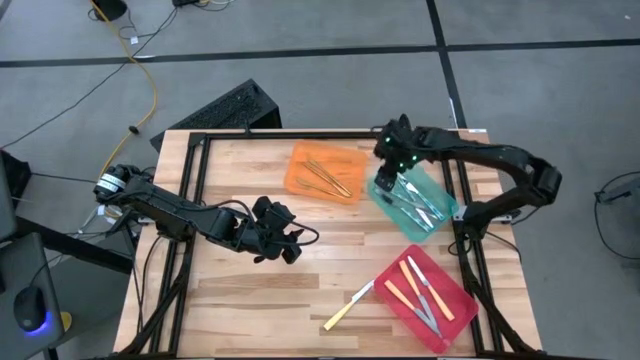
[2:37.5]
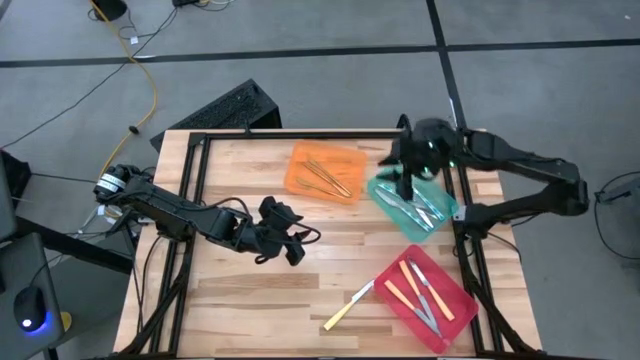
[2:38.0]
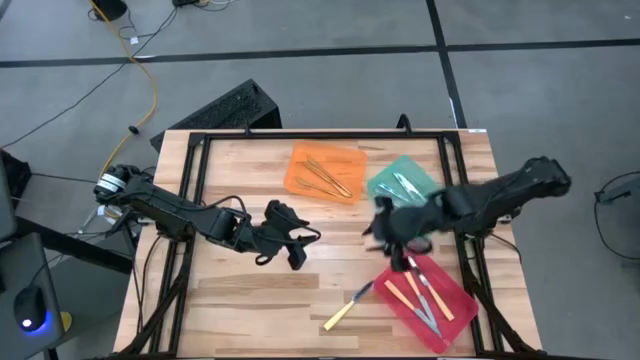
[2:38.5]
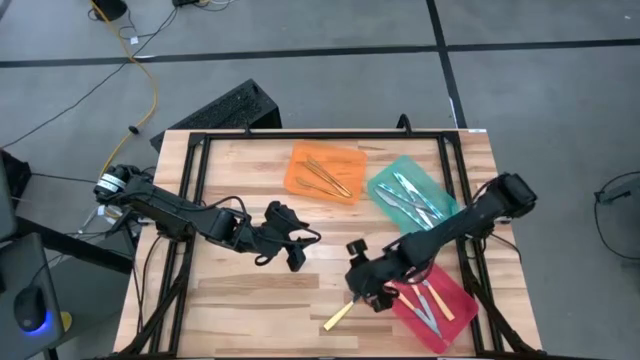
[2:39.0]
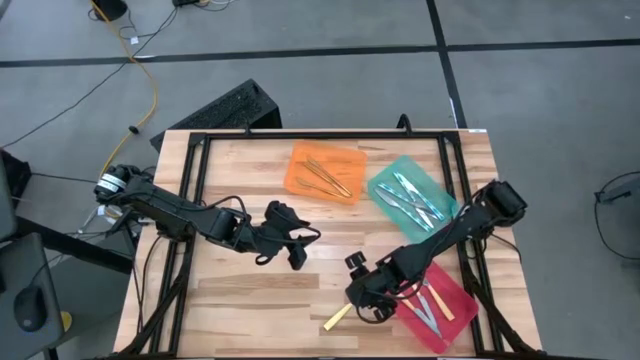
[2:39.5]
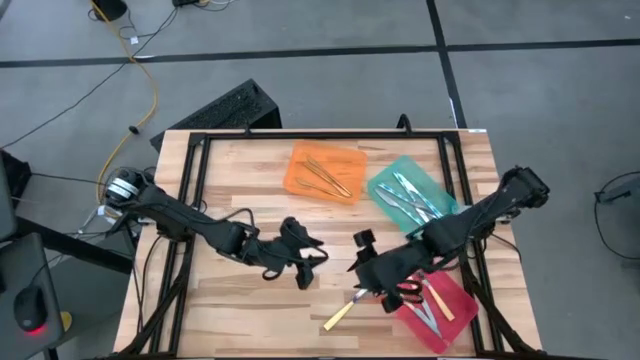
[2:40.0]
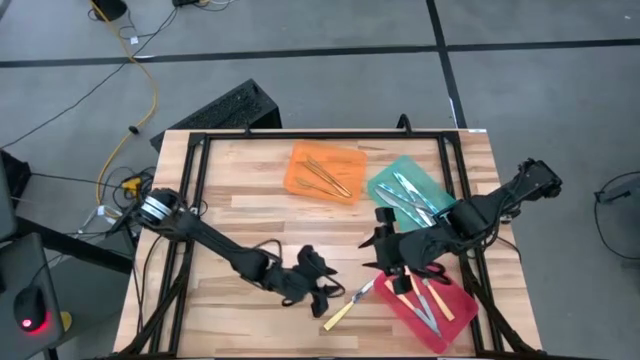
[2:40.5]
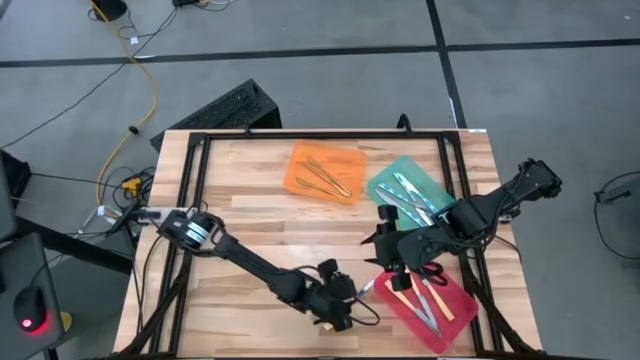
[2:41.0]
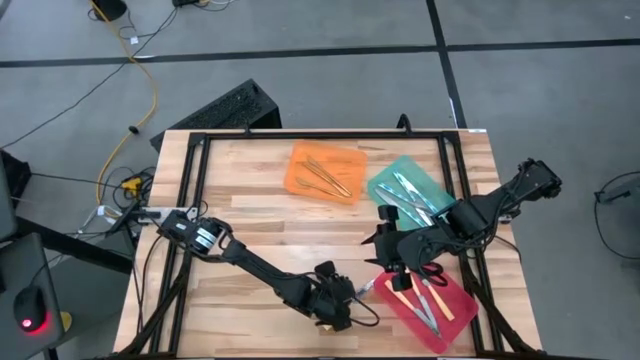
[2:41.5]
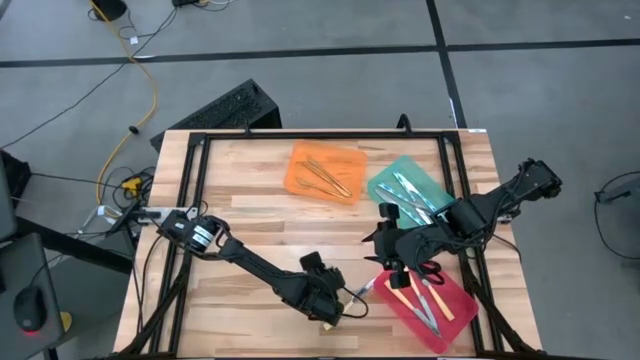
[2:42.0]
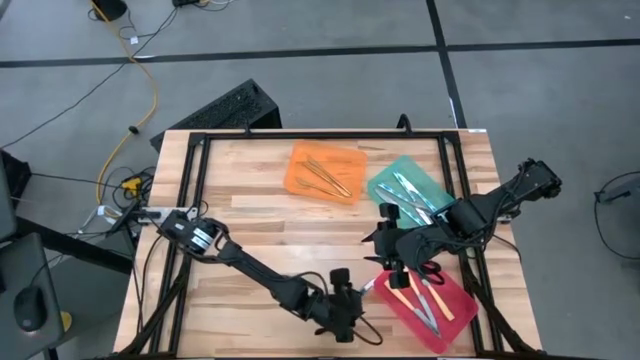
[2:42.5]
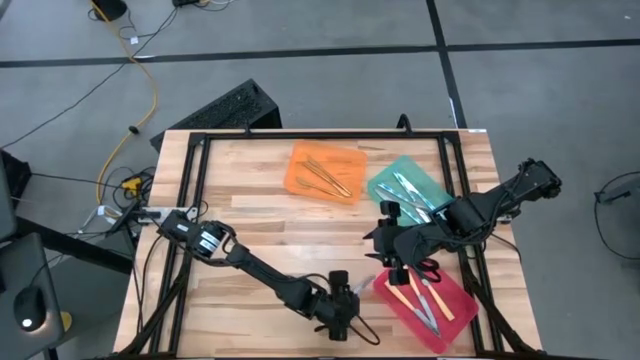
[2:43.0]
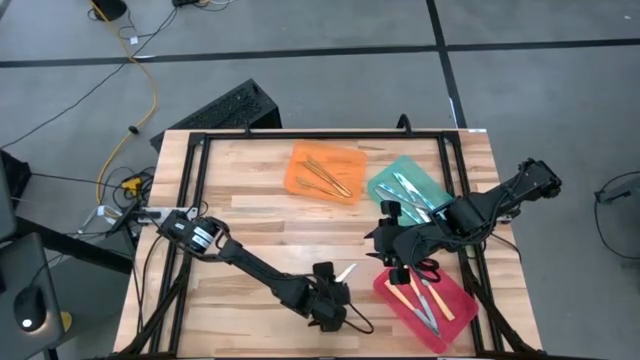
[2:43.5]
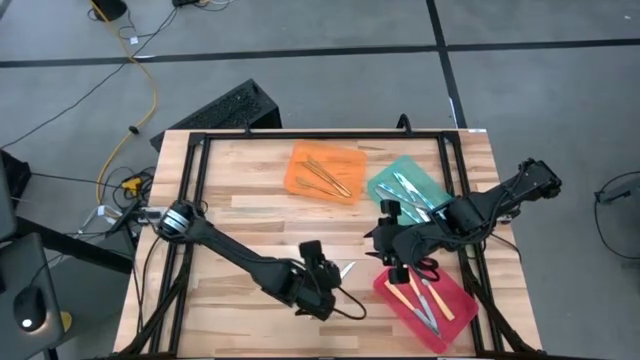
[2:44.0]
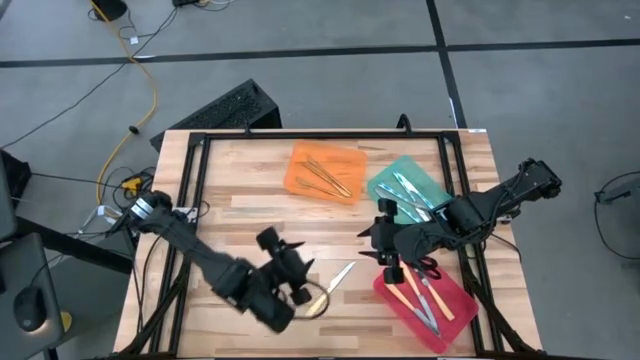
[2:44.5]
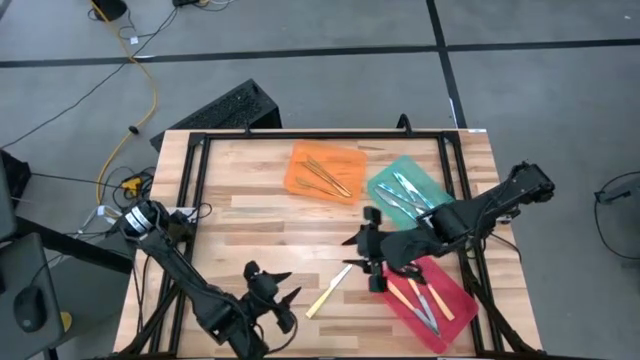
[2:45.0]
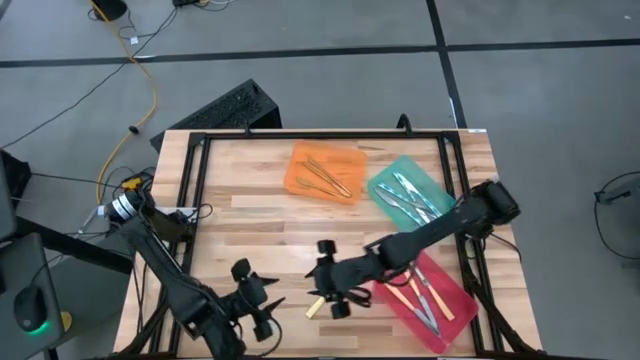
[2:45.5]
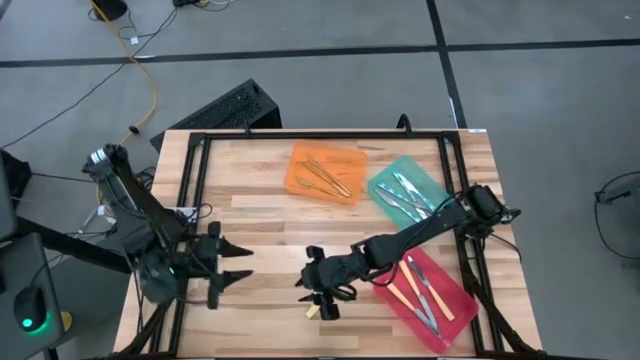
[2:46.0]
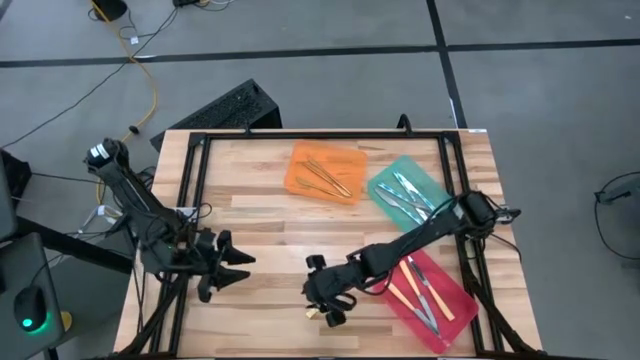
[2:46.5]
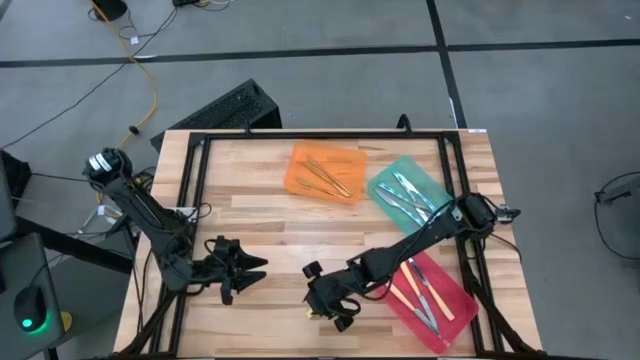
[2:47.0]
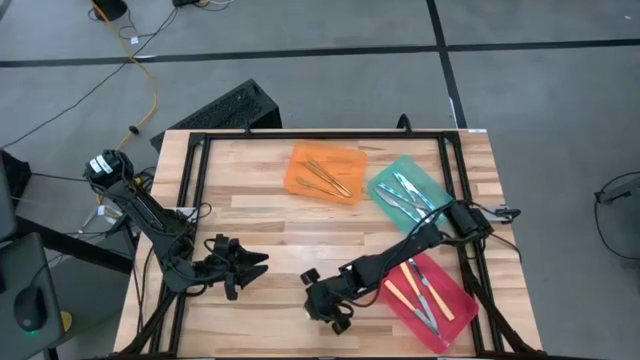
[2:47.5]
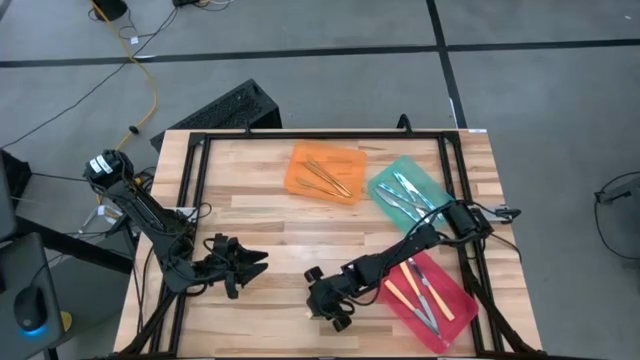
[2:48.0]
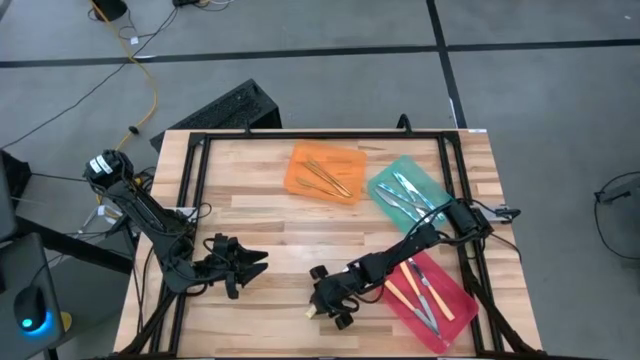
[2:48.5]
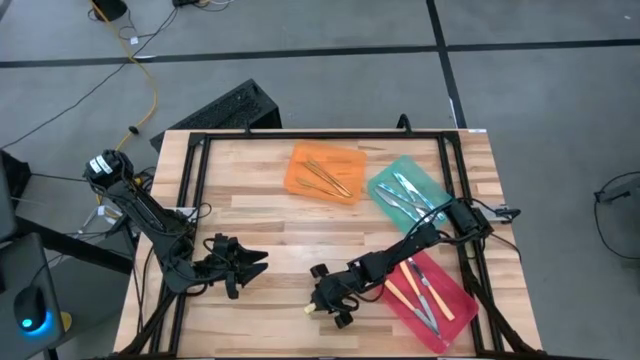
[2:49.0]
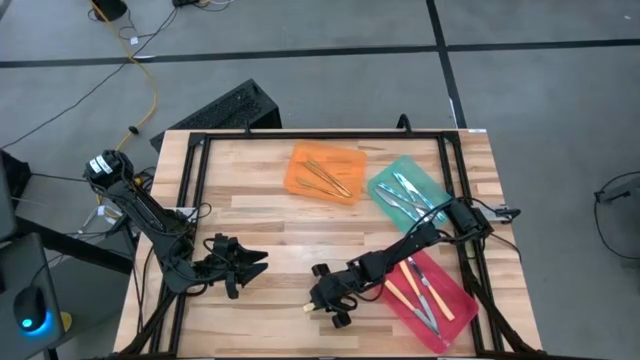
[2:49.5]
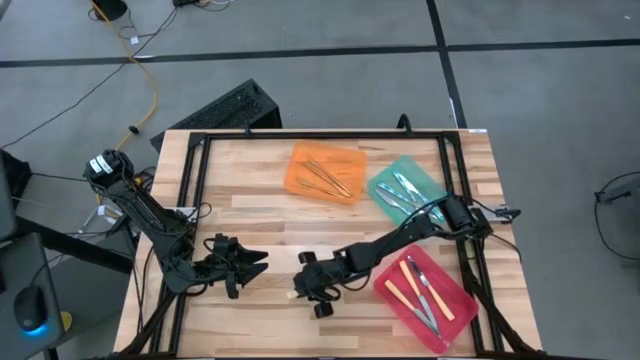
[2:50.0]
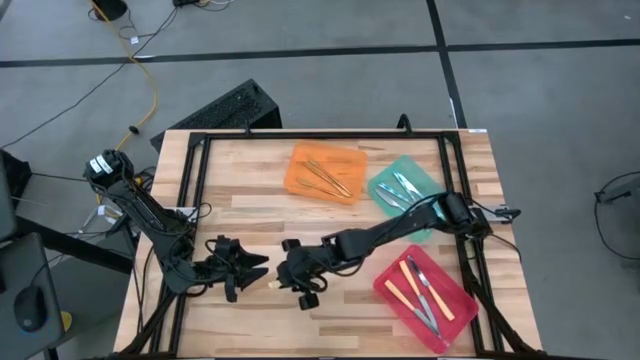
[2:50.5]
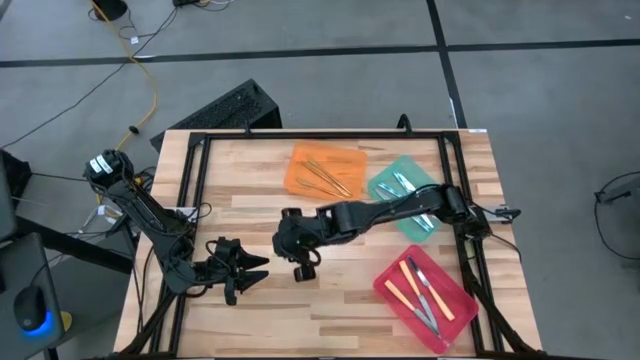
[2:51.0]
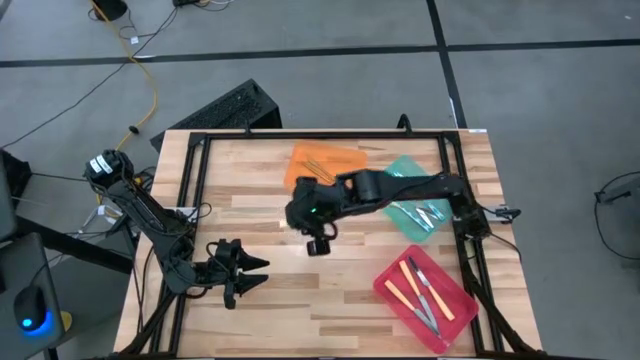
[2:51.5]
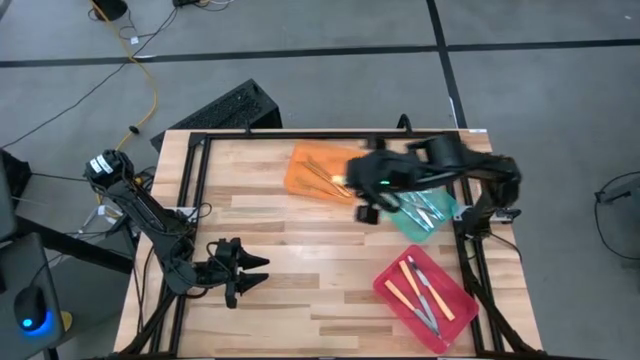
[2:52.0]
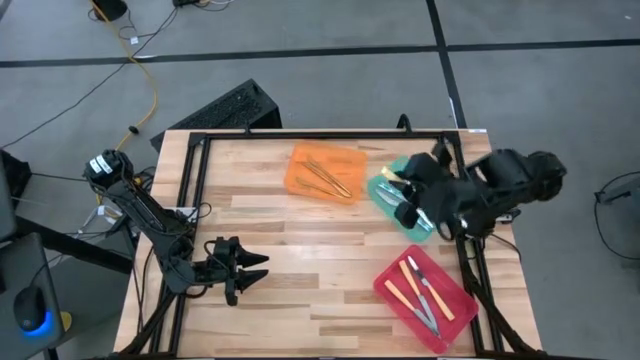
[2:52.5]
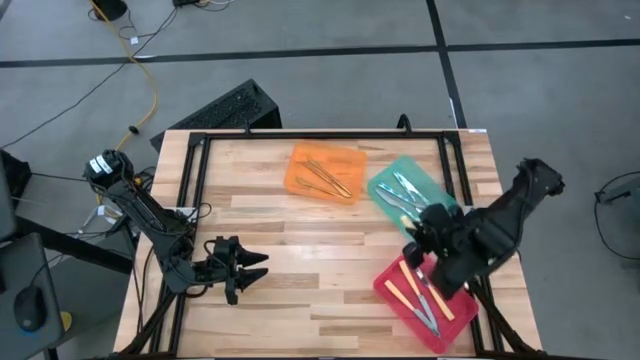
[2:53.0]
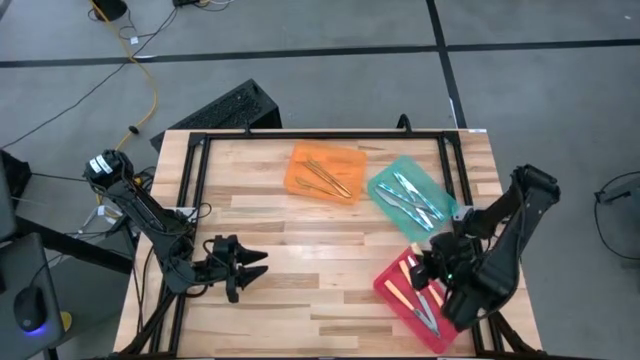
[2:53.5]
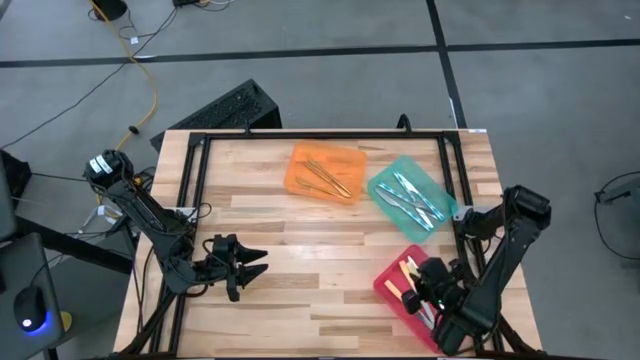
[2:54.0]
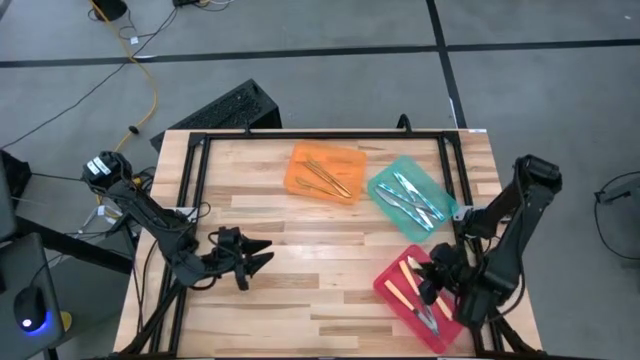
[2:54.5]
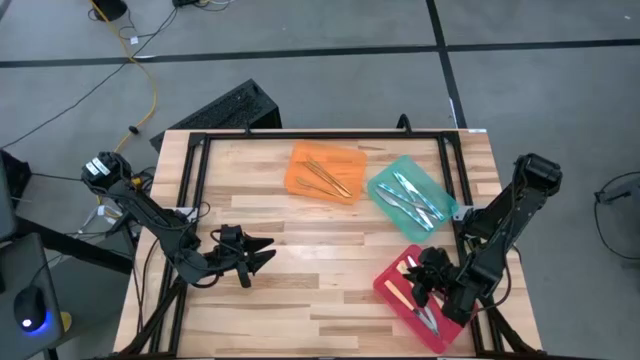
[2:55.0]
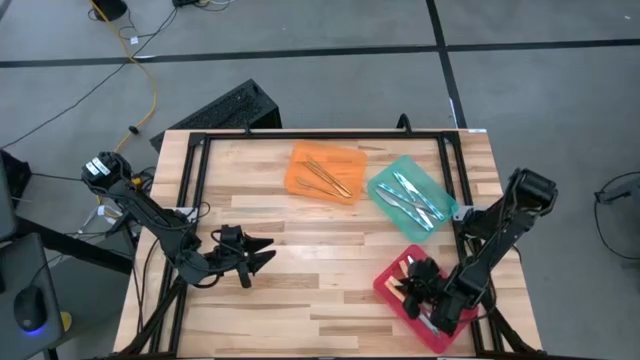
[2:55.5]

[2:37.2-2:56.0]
Task: Sort silverware by color (type)
Put the yellow knife into the red bin
